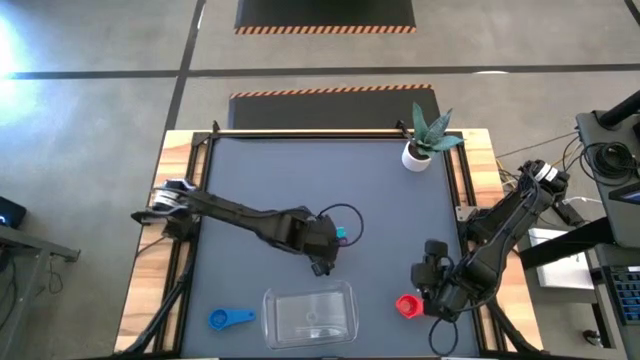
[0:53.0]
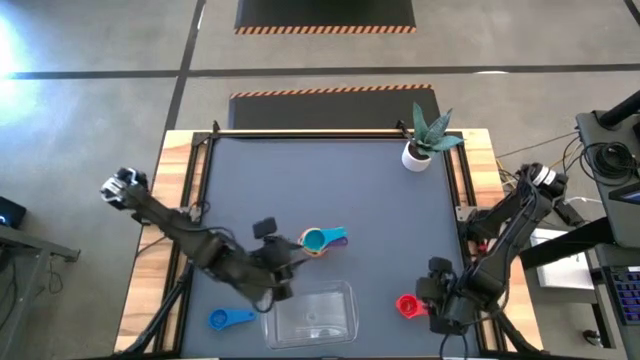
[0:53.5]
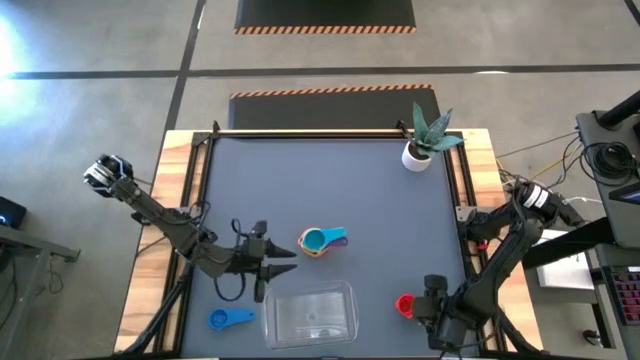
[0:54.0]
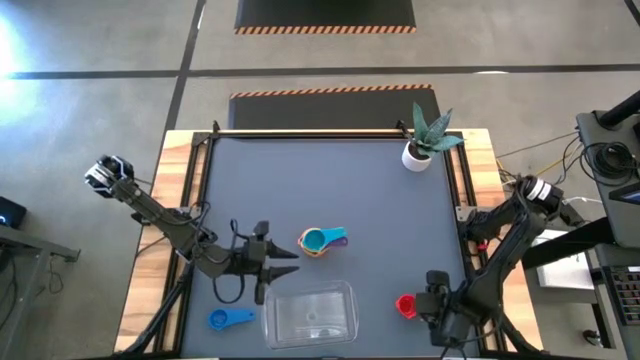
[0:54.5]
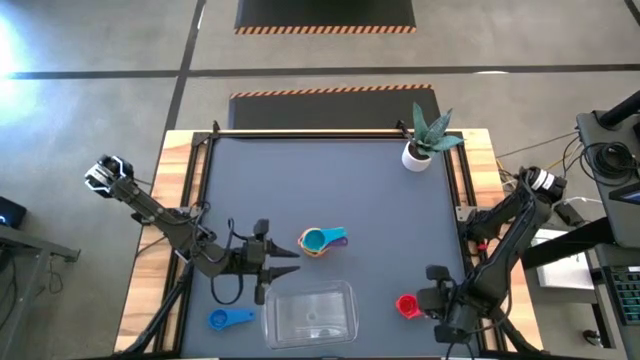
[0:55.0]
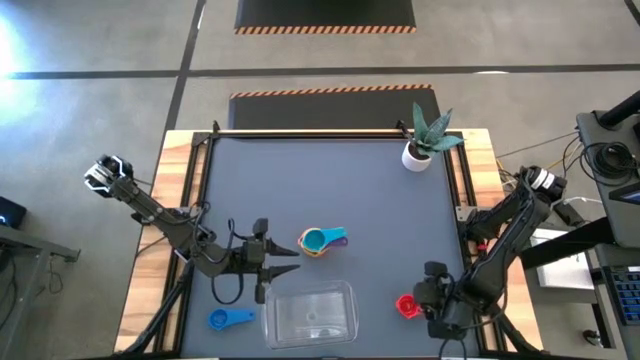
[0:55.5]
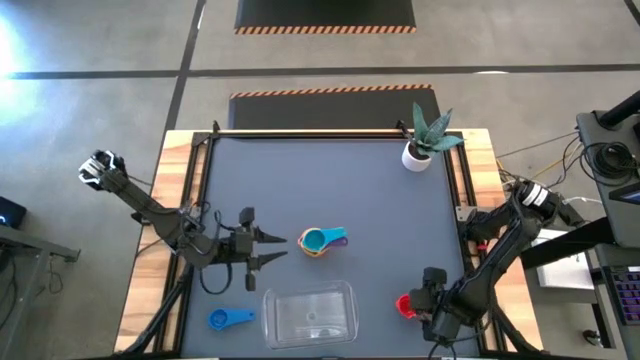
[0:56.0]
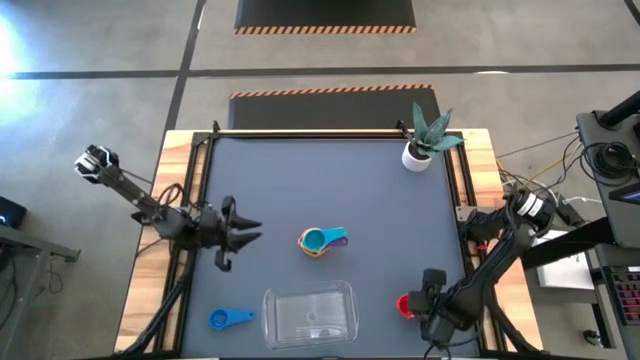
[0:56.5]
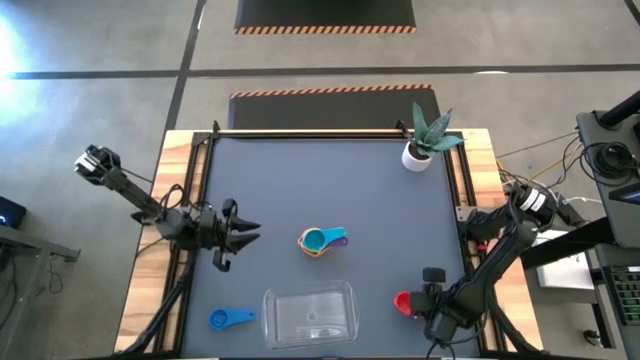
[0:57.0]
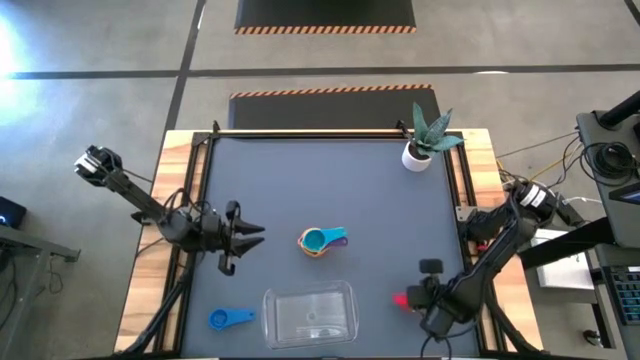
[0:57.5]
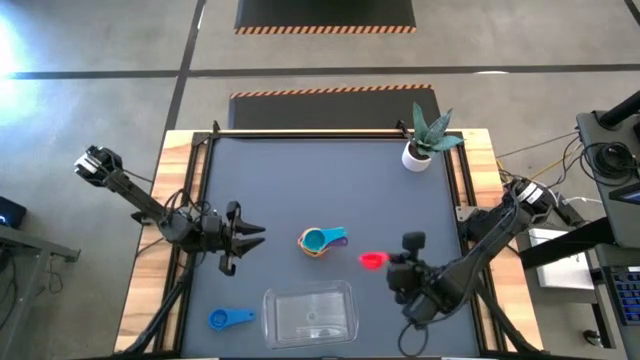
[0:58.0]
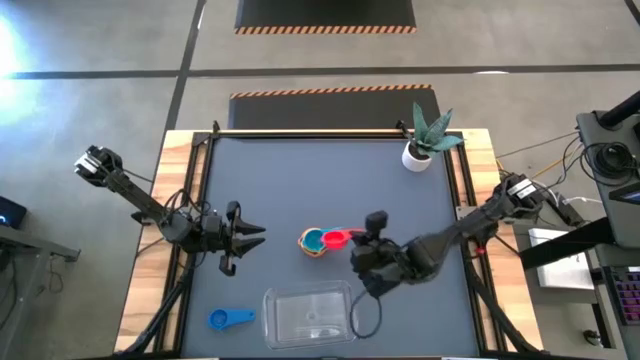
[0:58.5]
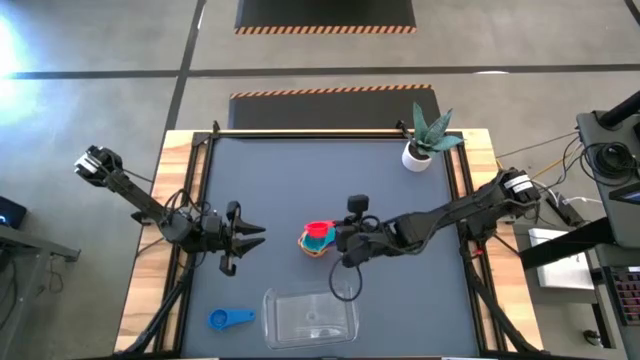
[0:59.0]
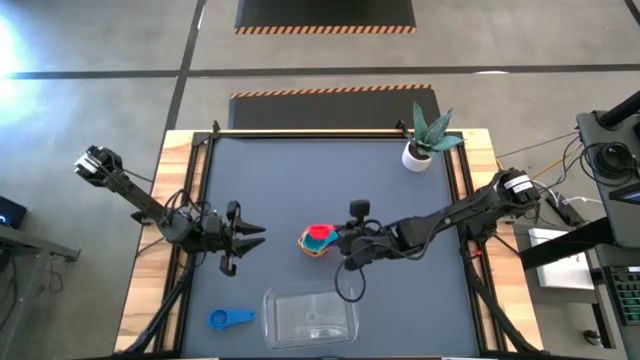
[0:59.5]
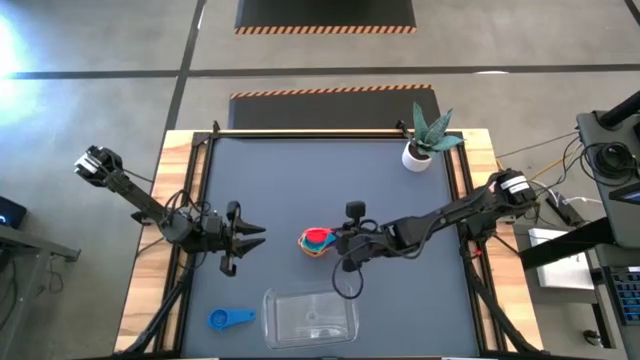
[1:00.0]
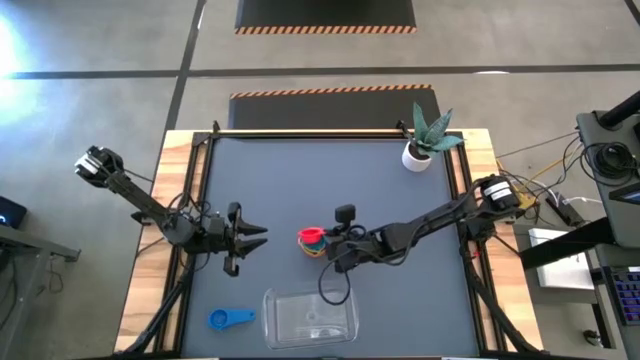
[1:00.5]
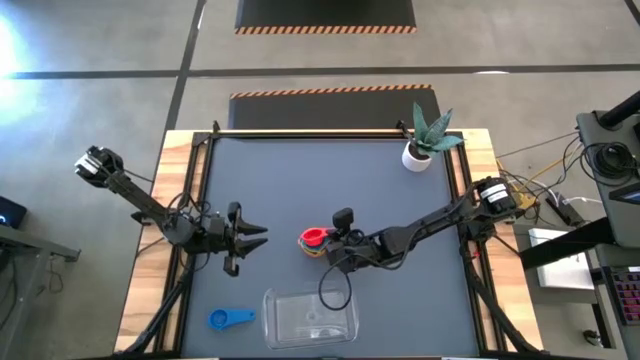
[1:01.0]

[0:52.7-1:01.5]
Task: Nest measuring cups in basket
Stack the red measuring cup on top of the light blue measuring cup

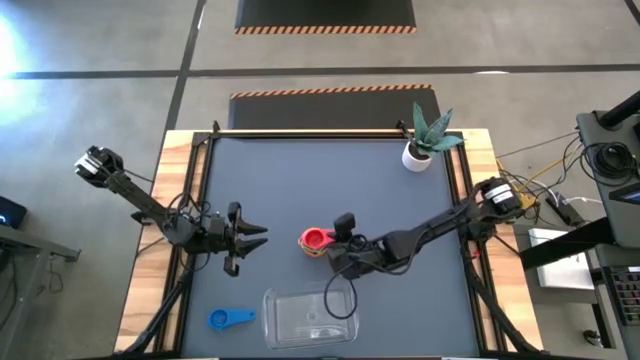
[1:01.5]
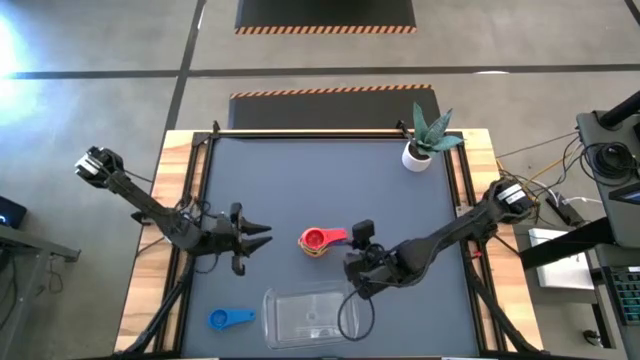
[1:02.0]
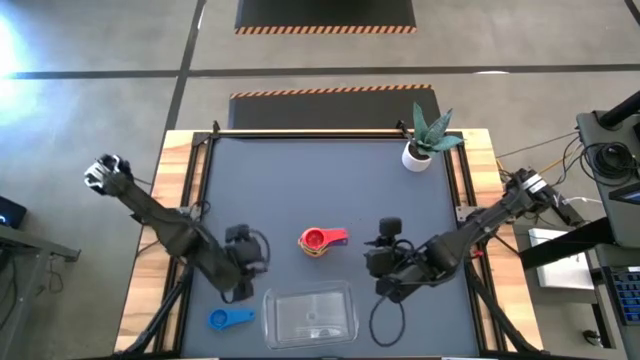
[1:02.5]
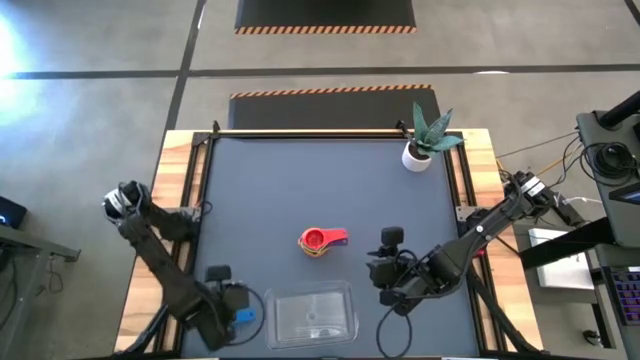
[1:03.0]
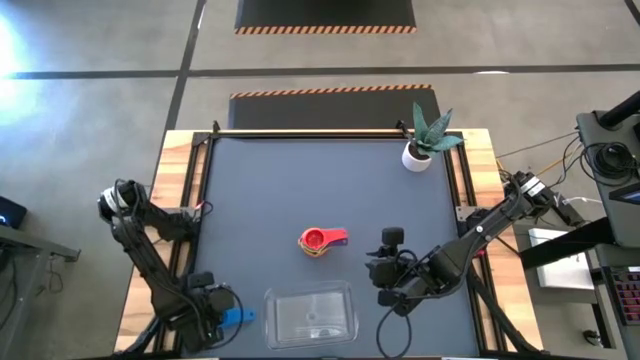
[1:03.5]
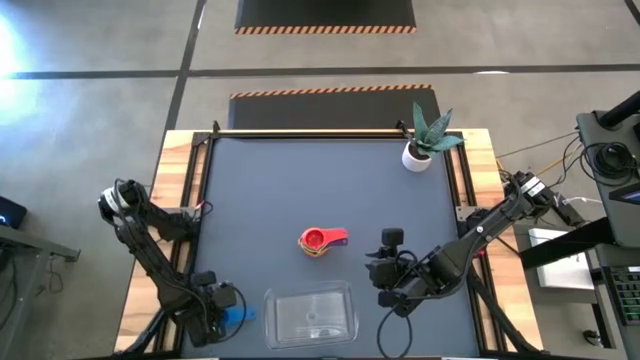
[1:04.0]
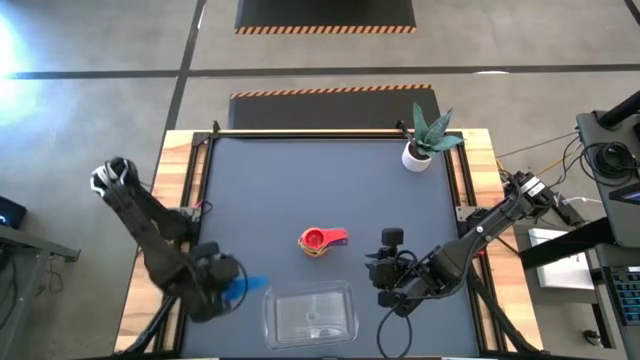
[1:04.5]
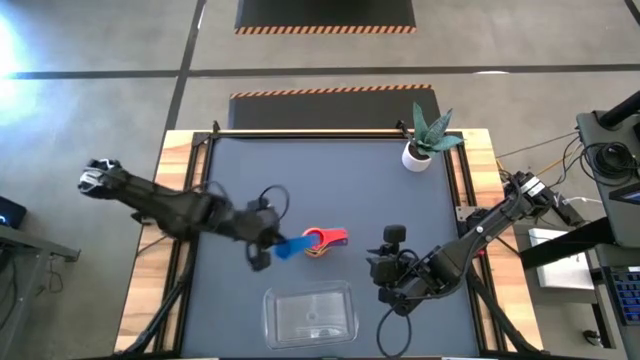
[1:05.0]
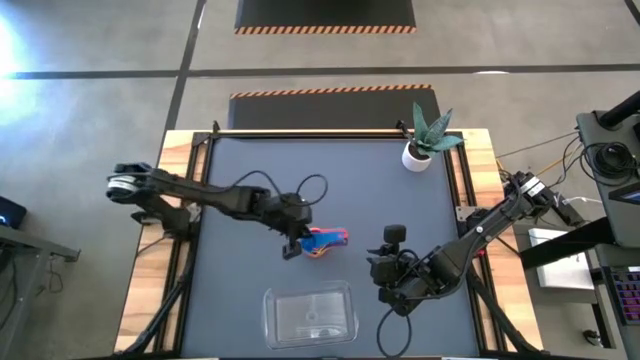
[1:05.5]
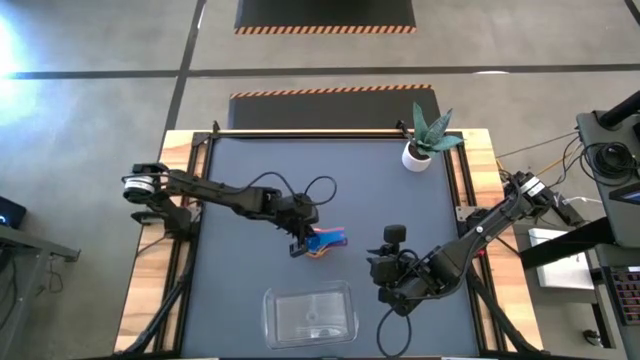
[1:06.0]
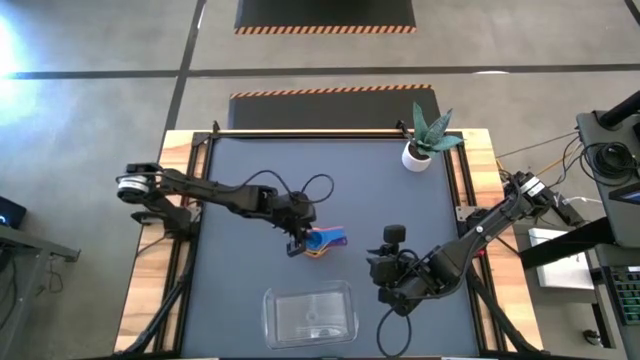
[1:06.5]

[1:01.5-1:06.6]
Stack the blue measuring cup on top of the red measuring cup

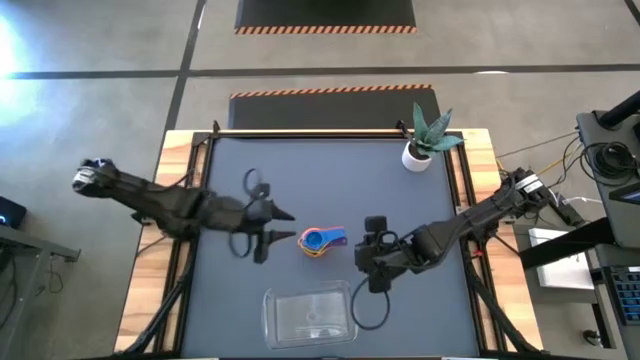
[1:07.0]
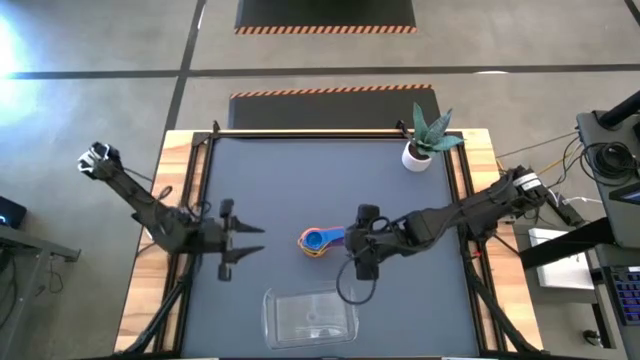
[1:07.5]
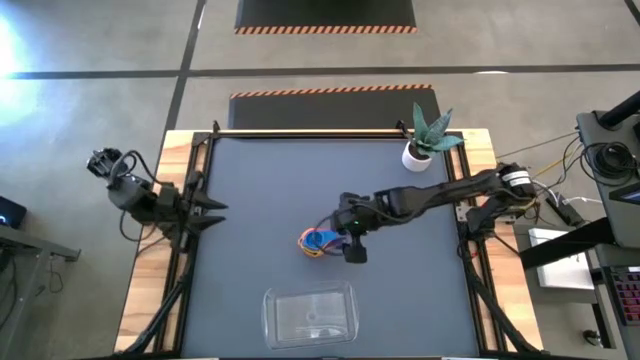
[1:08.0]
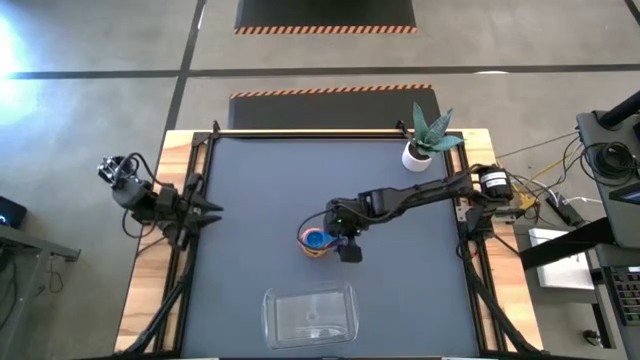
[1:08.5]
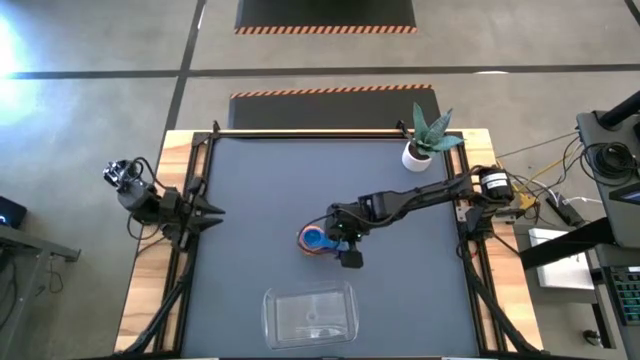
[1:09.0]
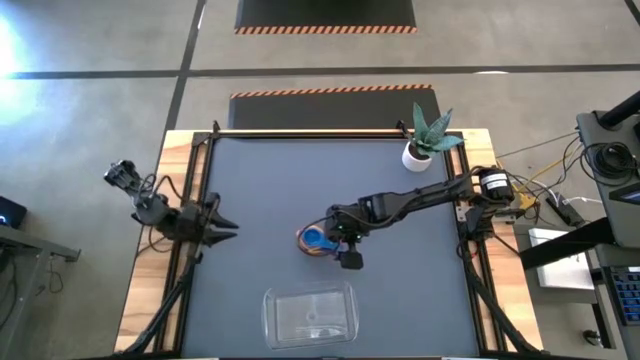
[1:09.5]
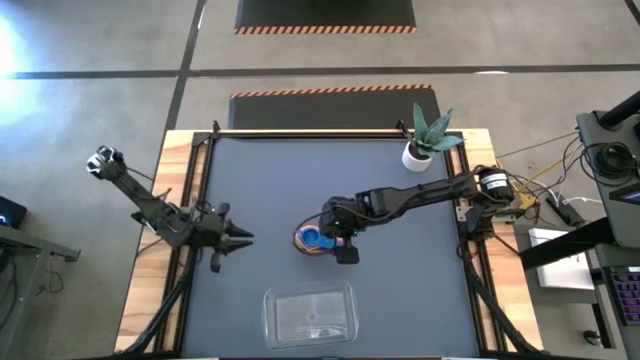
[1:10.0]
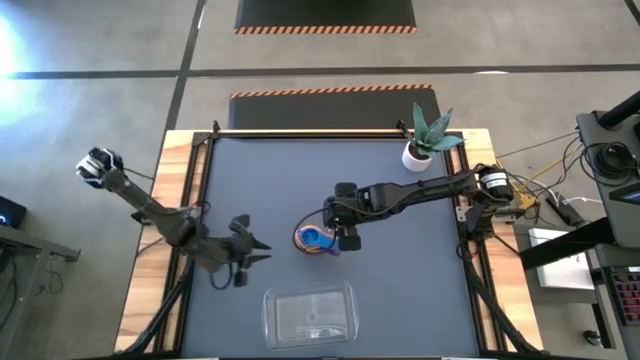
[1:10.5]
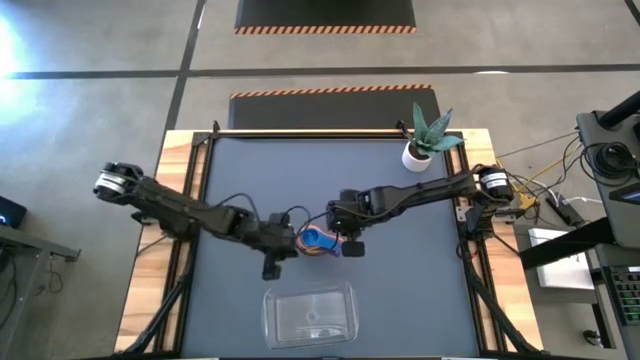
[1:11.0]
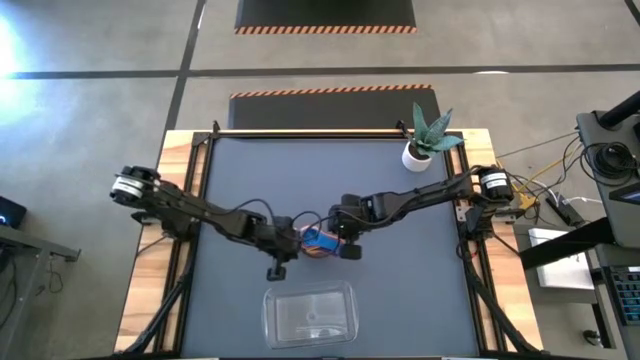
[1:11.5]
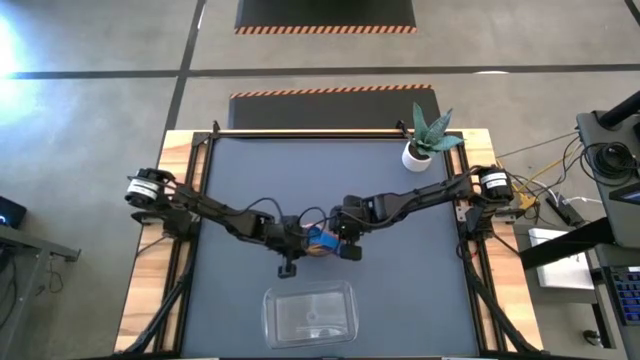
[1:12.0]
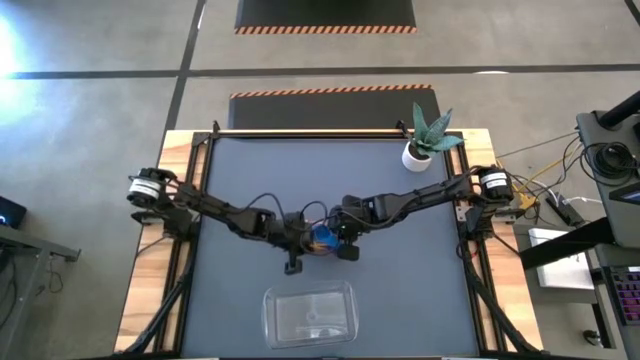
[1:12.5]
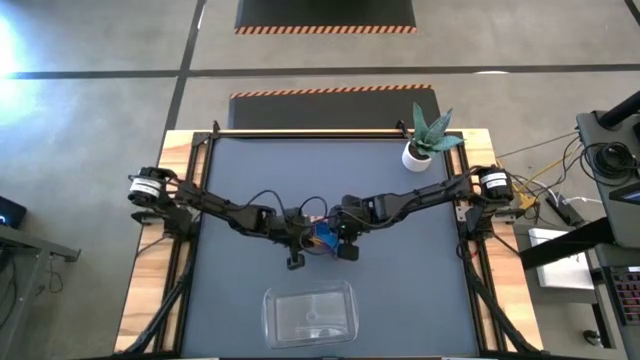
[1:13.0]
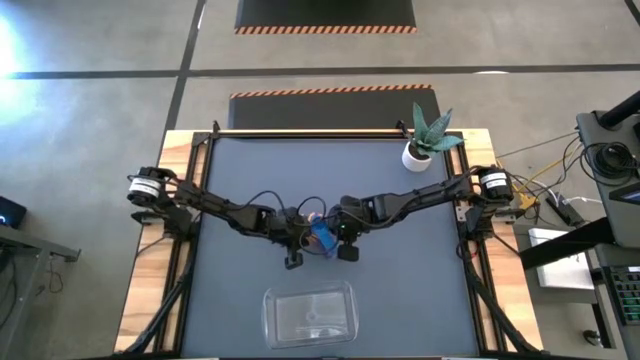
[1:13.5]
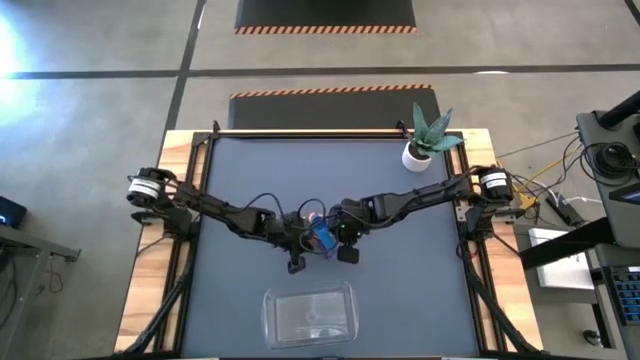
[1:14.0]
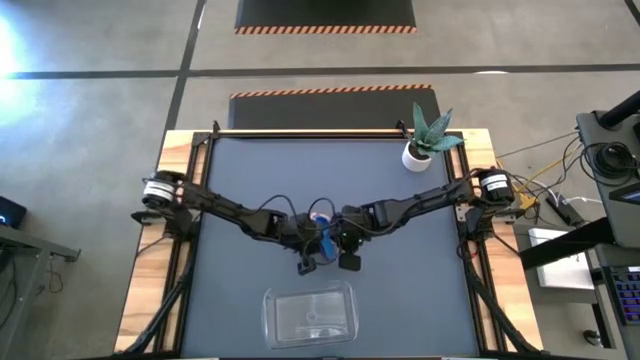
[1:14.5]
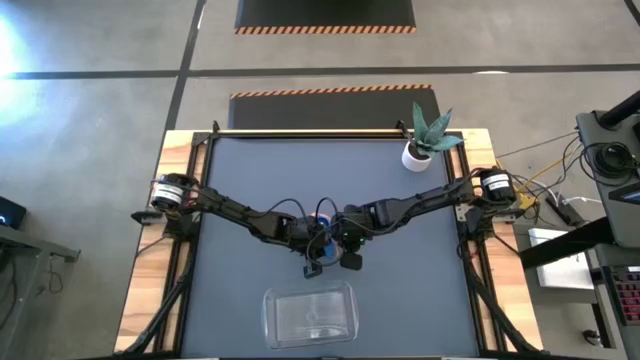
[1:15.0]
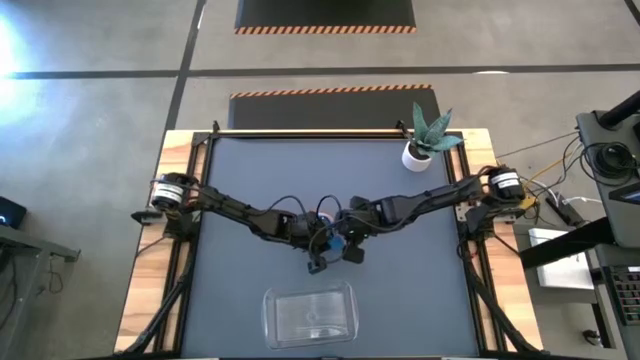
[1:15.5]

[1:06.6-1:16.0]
Adjust the stacked measuring cups on the table
